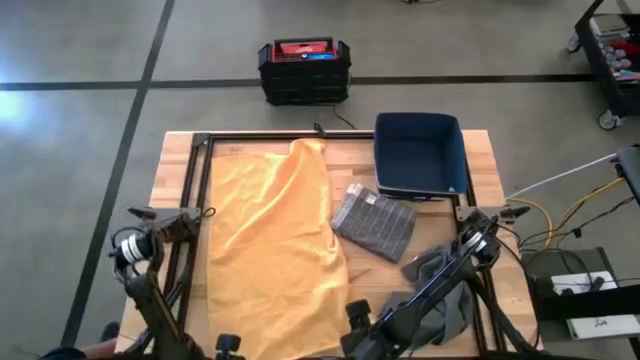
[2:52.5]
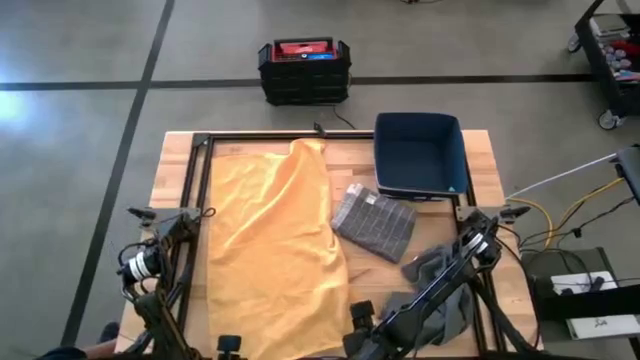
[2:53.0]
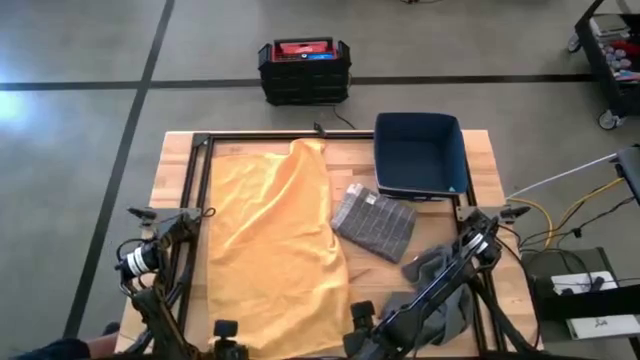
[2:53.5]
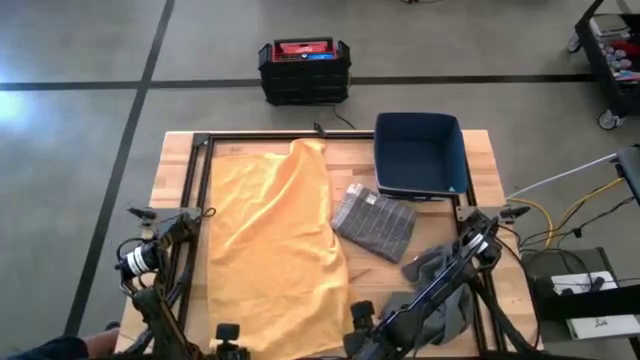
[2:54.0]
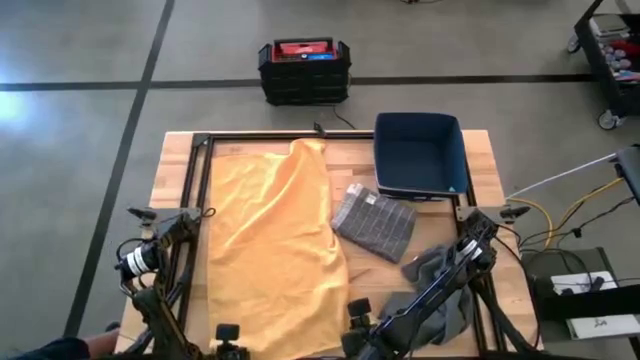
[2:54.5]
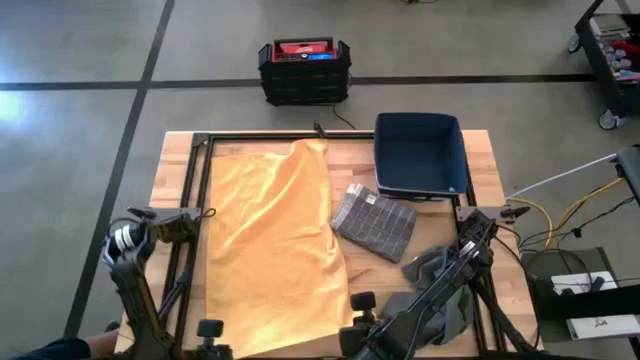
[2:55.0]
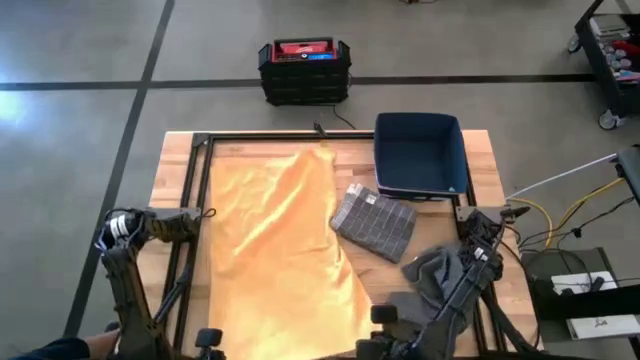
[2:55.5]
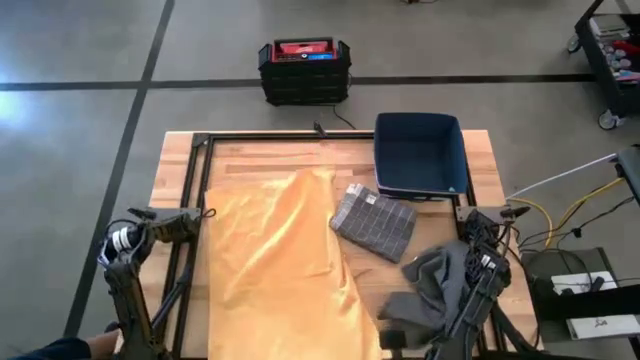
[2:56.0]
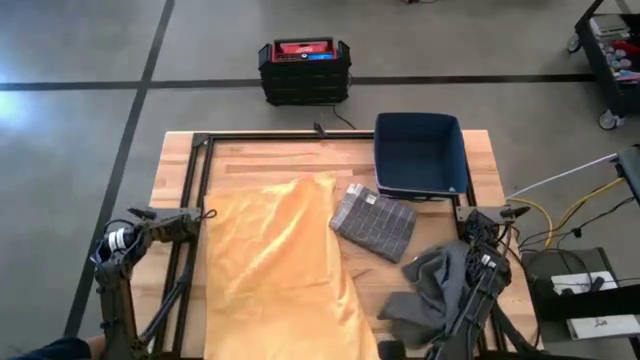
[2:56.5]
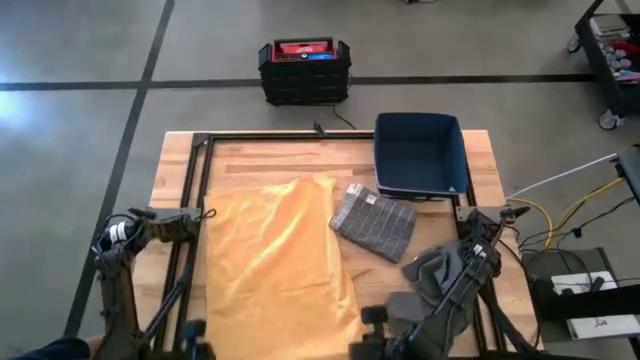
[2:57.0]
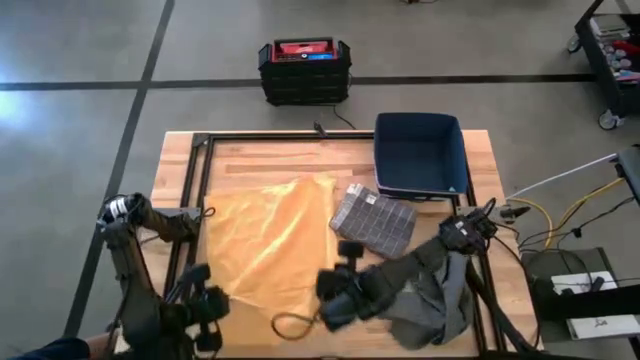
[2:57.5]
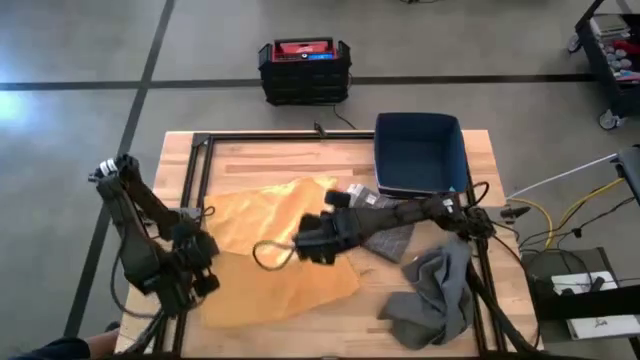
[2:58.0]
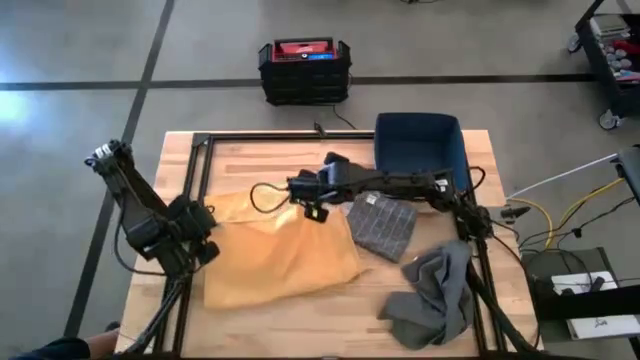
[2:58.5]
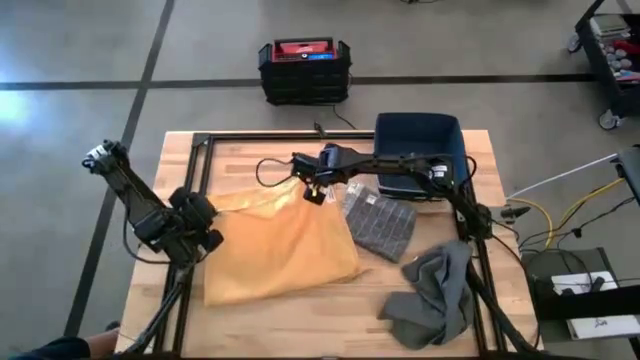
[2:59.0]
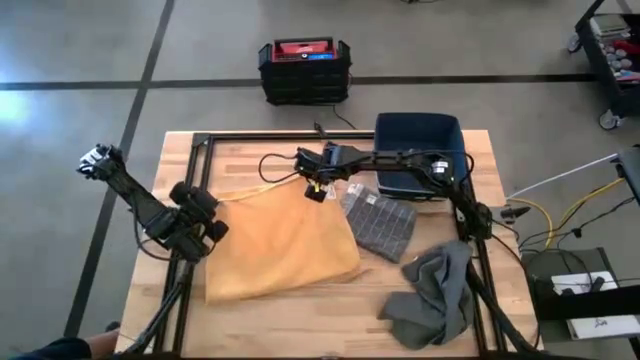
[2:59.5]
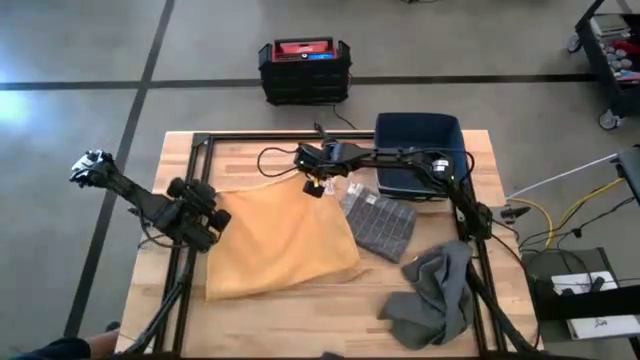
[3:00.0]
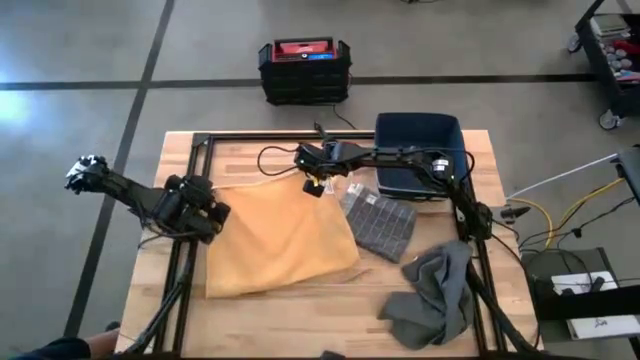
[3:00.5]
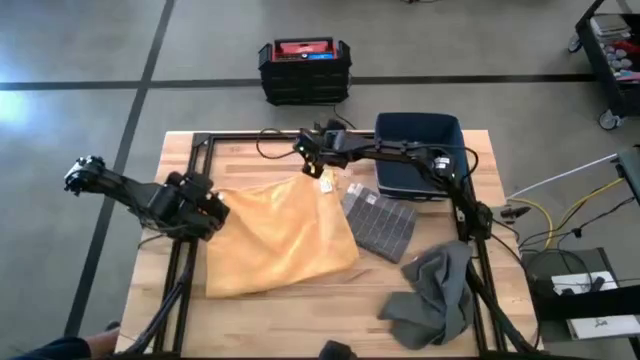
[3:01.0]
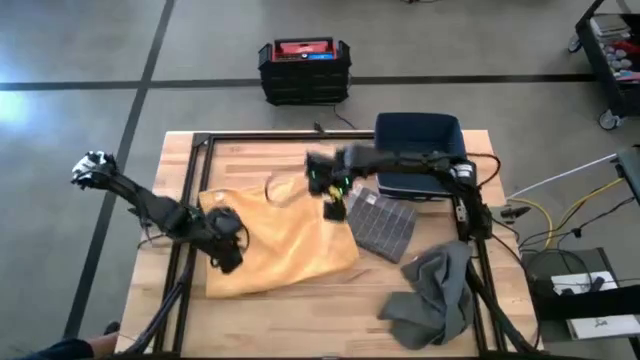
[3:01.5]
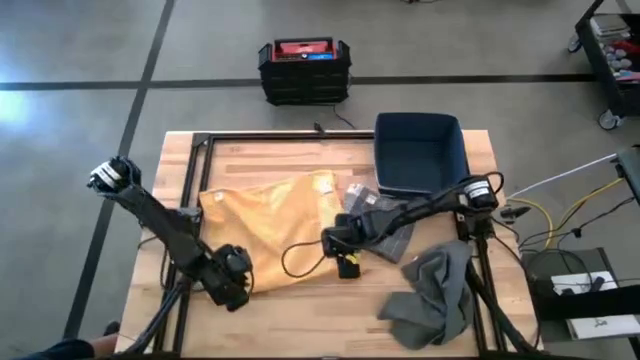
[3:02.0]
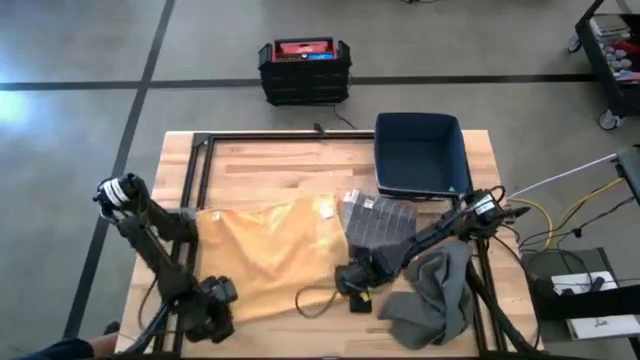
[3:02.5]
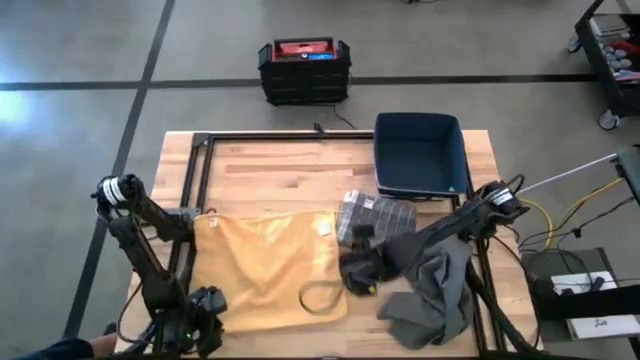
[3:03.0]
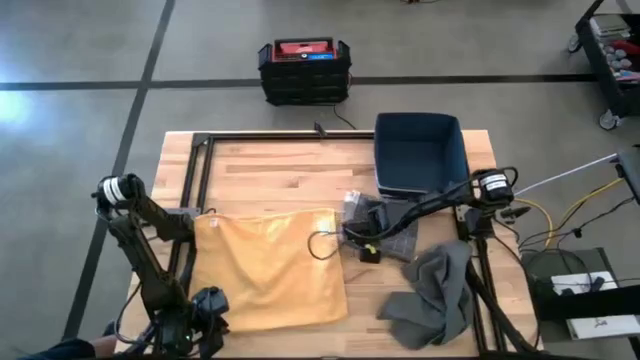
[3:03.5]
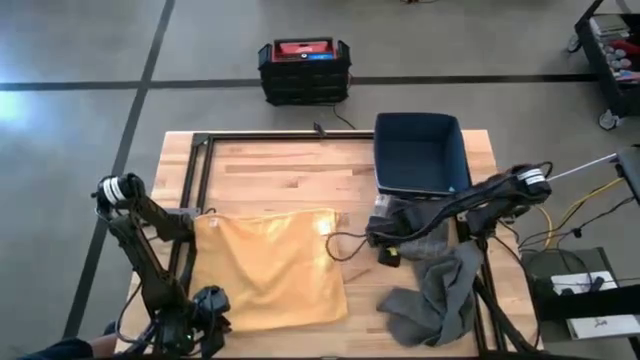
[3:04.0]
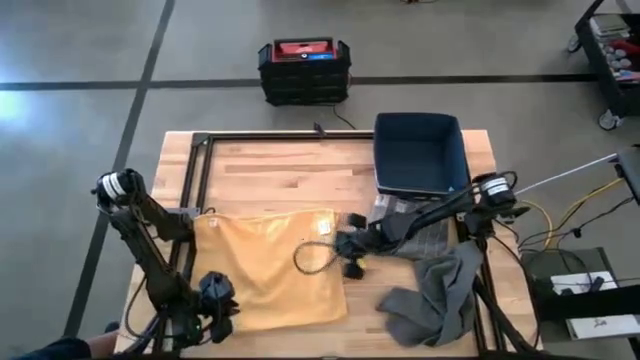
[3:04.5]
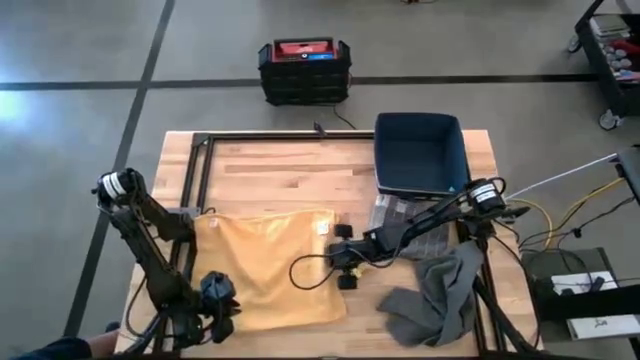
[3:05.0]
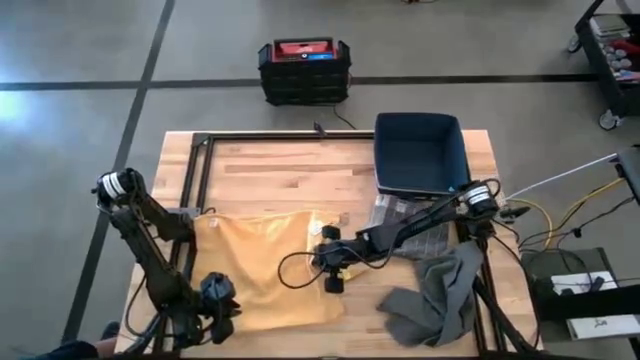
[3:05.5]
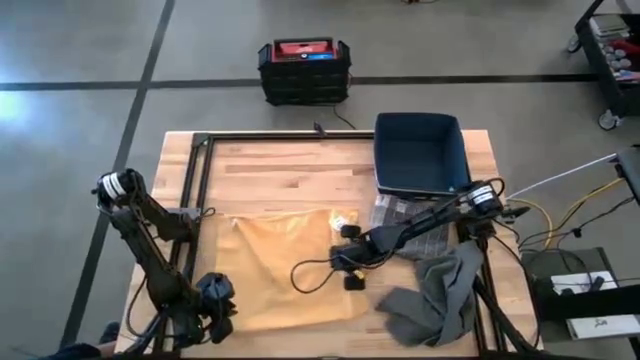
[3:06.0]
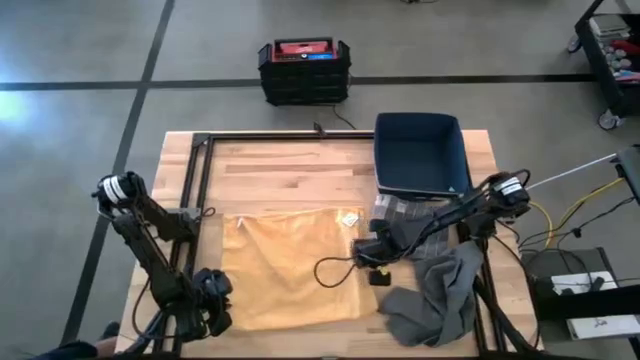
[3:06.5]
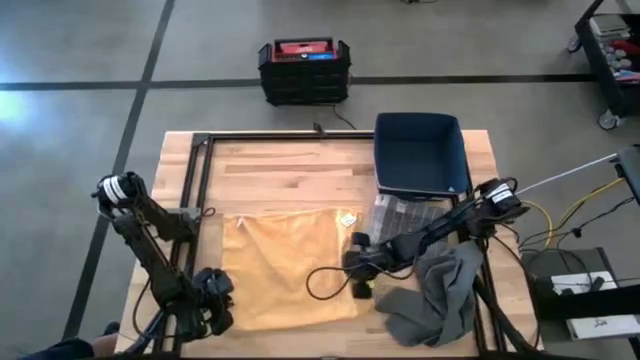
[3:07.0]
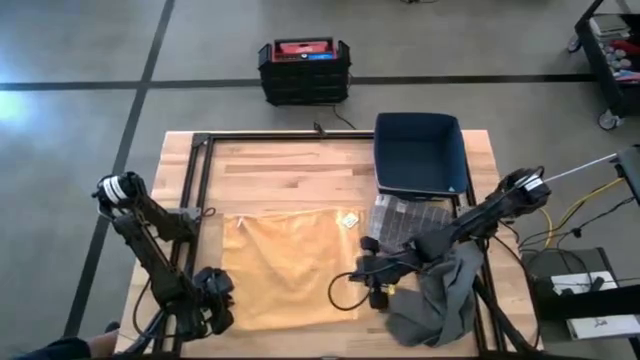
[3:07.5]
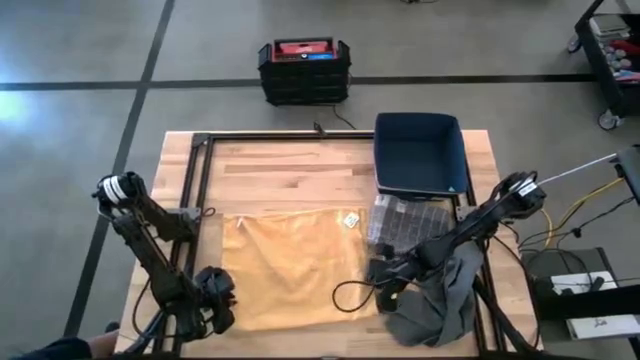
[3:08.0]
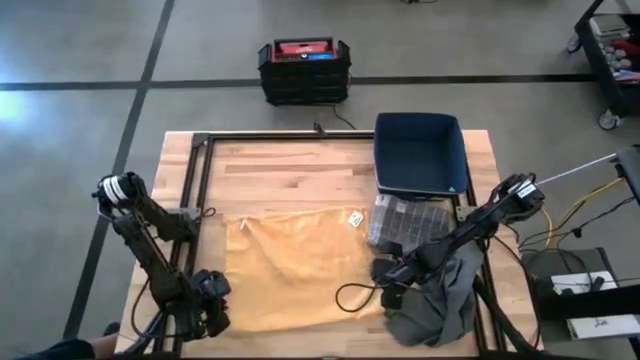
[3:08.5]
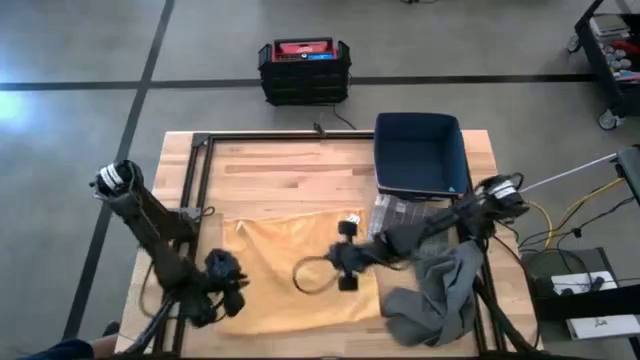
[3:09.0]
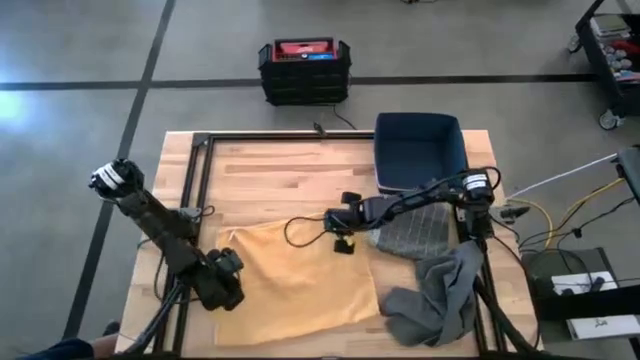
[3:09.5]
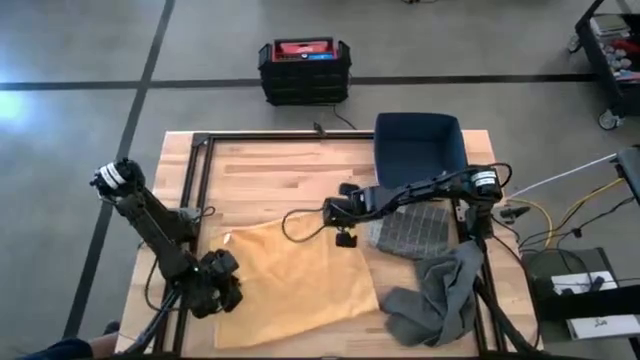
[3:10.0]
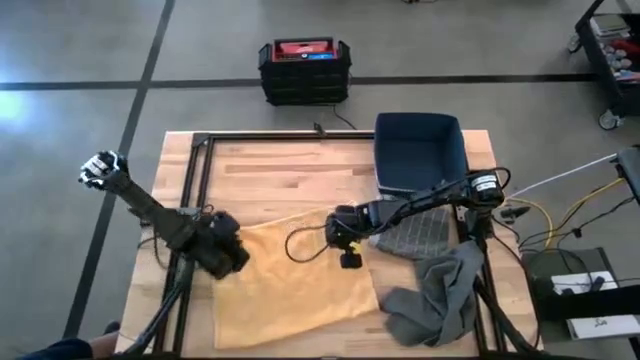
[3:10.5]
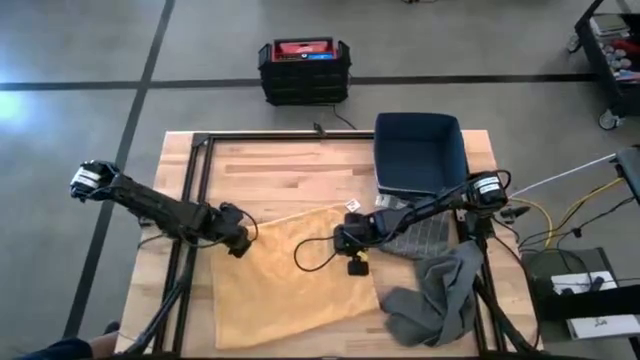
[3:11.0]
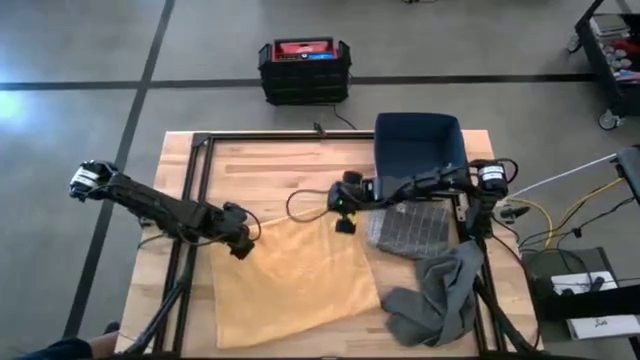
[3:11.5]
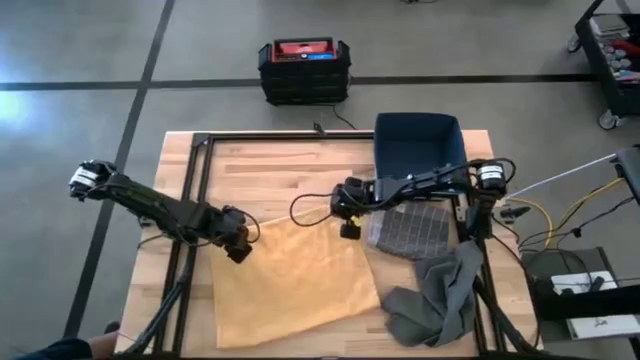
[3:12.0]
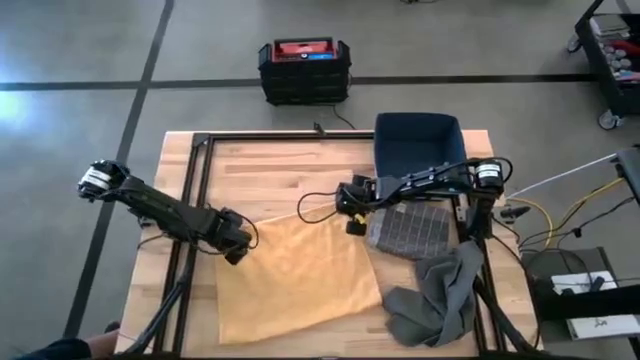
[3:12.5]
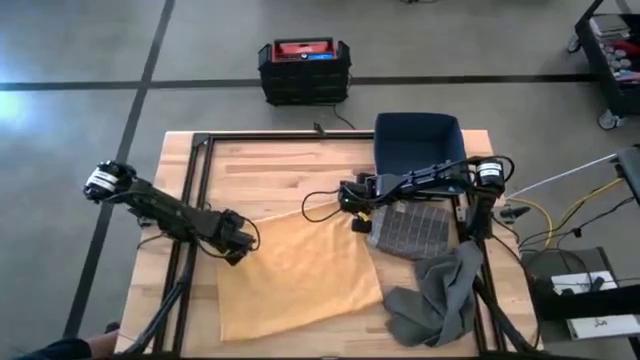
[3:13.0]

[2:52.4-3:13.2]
Task: Fold towel
Fold the yellow kitchen towel
